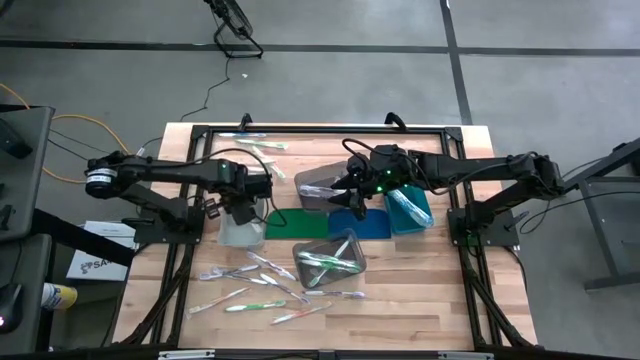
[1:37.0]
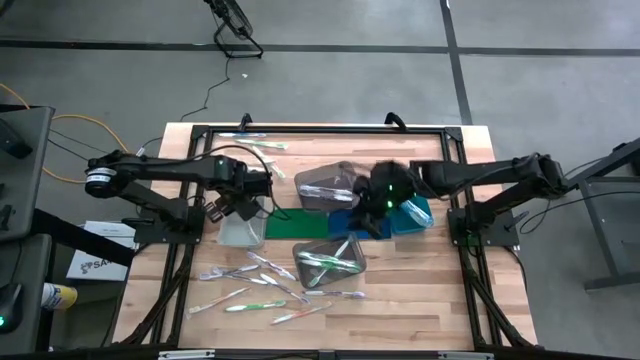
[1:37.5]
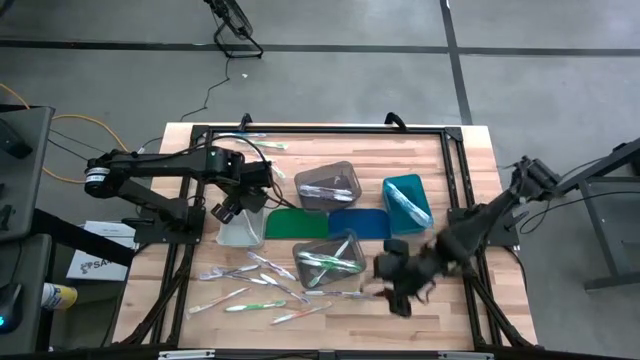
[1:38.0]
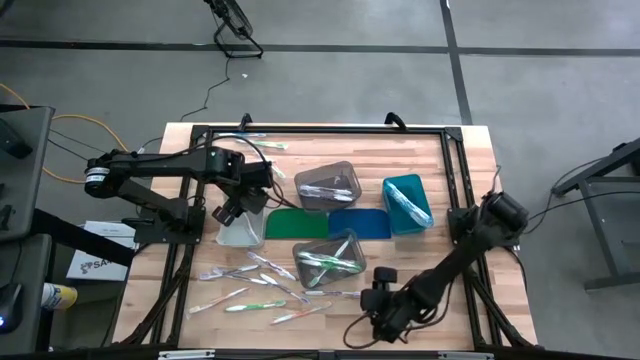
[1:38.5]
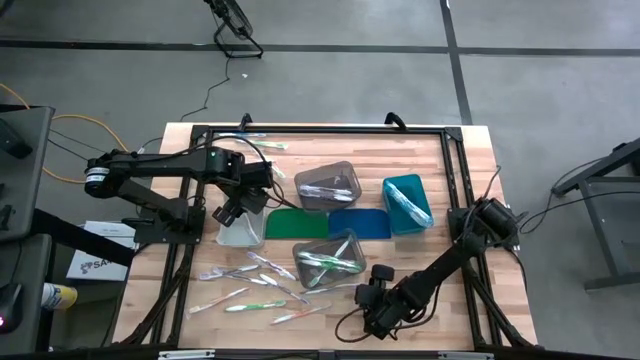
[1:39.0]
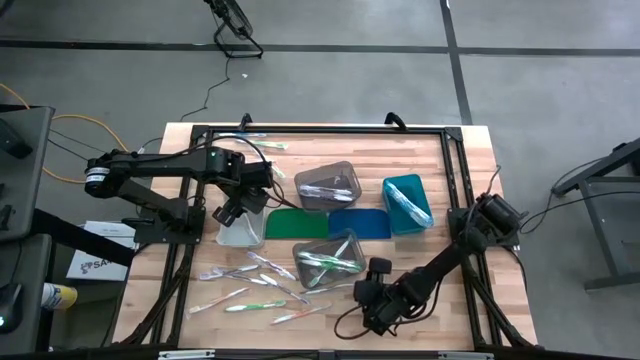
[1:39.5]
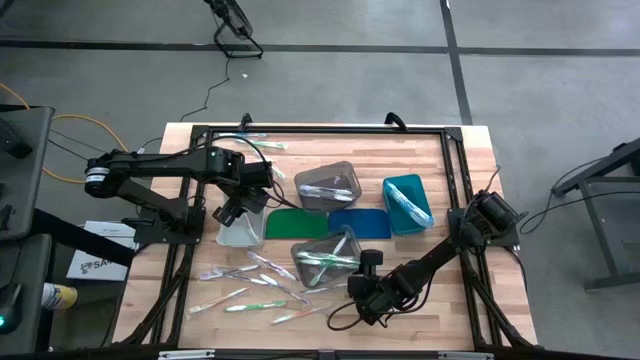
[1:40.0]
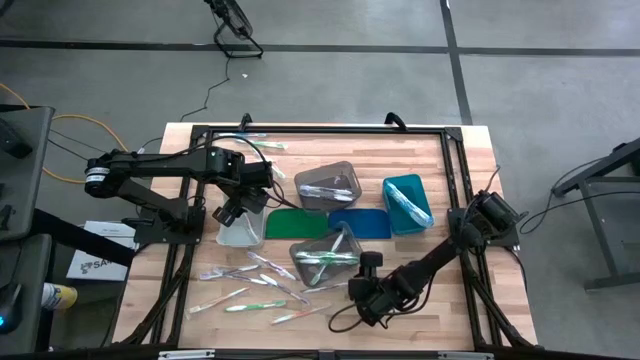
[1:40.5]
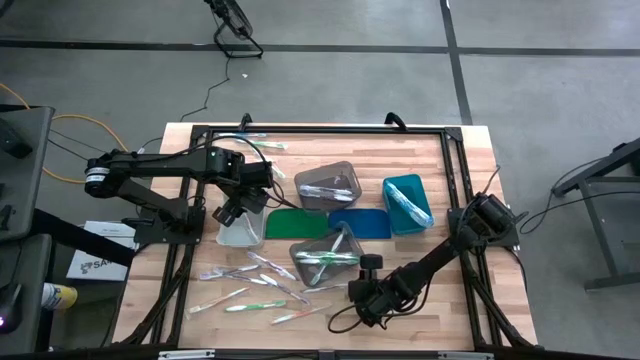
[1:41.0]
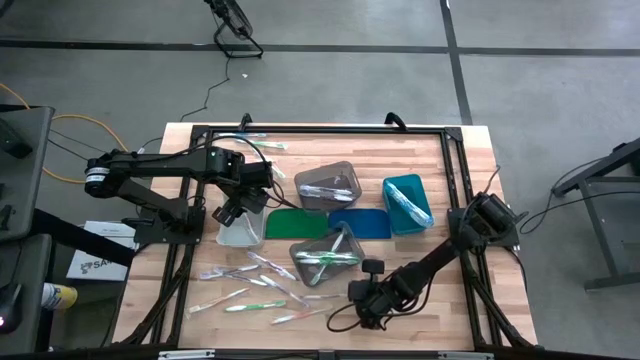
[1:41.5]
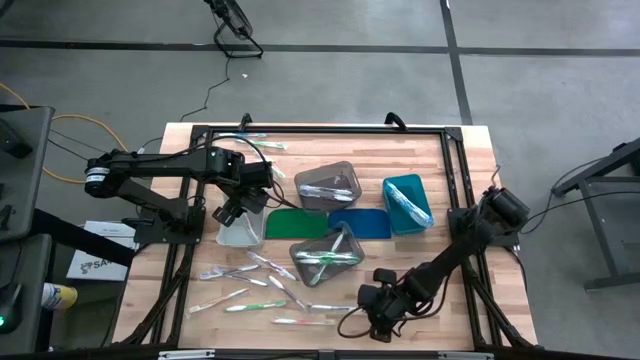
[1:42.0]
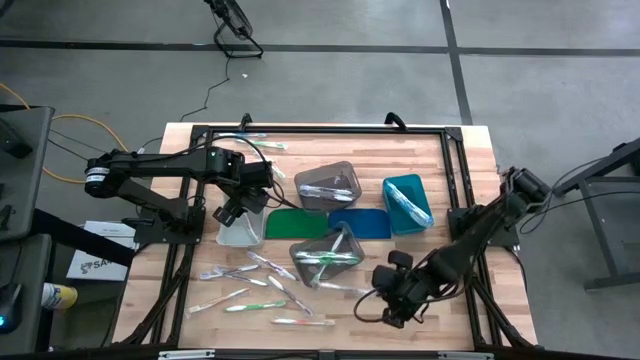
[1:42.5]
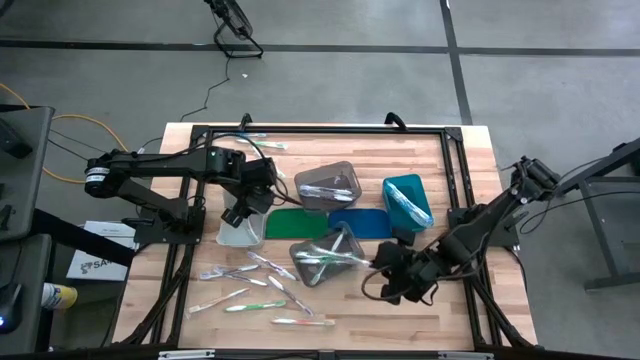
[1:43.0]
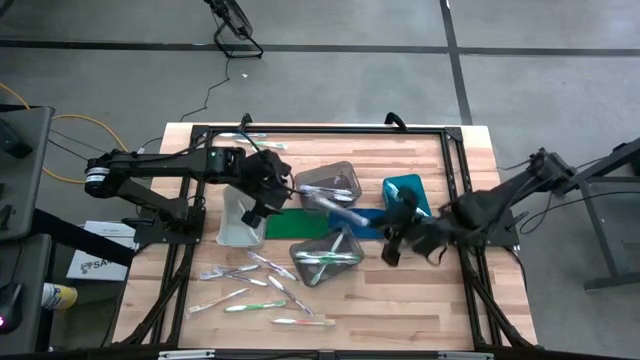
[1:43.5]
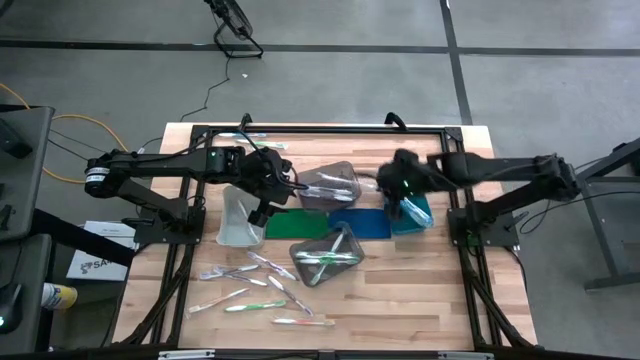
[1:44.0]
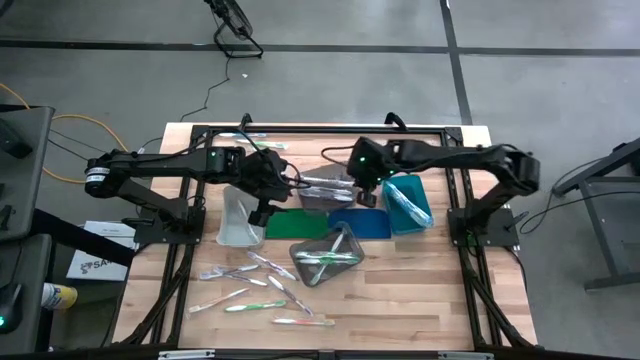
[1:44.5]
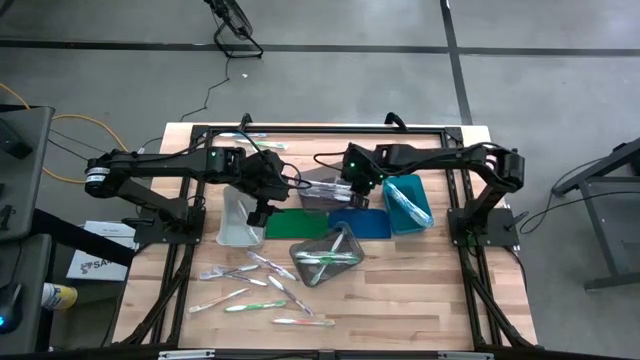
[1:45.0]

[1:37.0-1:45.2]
Task: Pick & Place Toothbrushes
Put the purple toothbrush into the top black bin

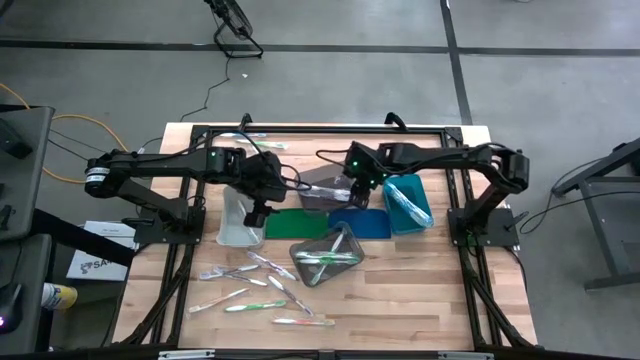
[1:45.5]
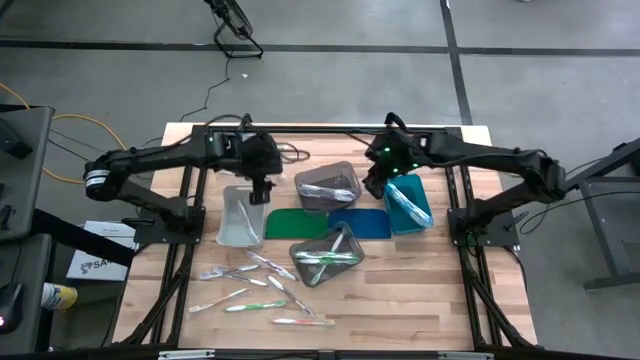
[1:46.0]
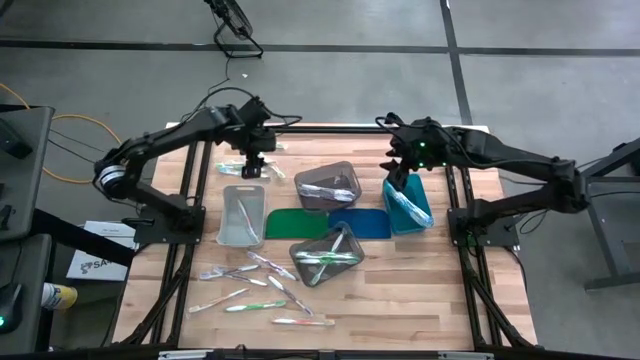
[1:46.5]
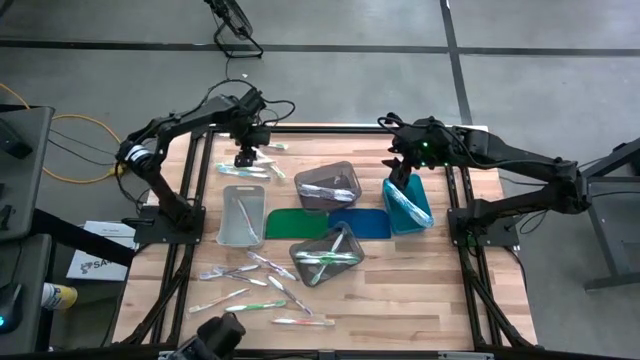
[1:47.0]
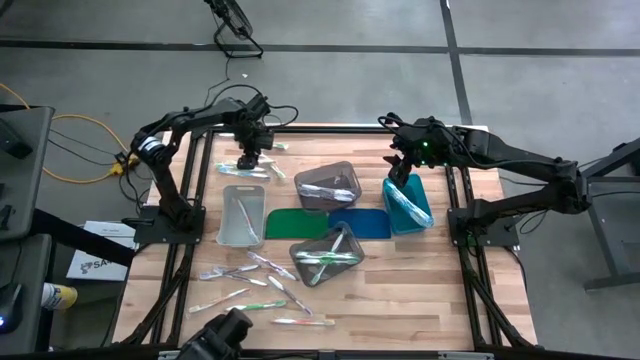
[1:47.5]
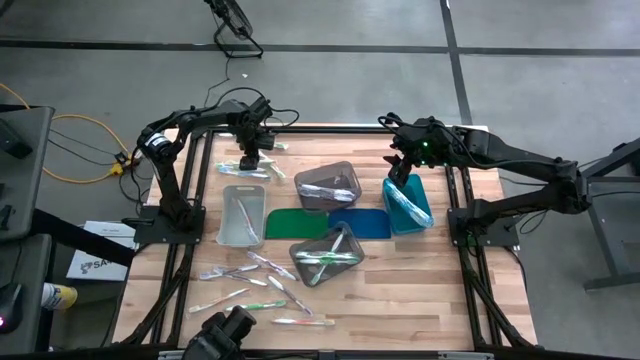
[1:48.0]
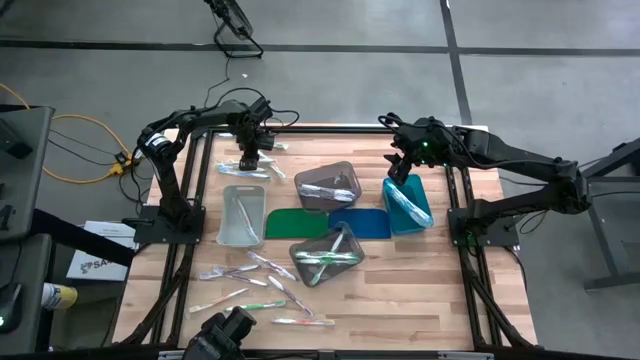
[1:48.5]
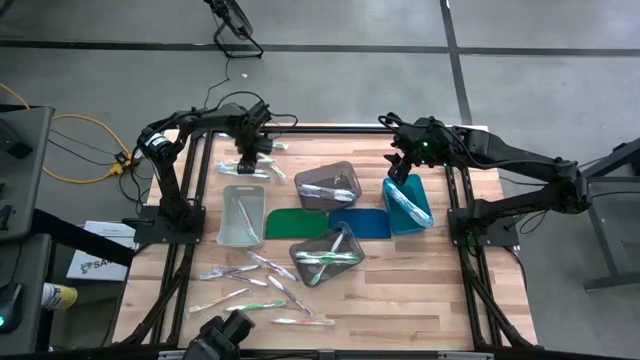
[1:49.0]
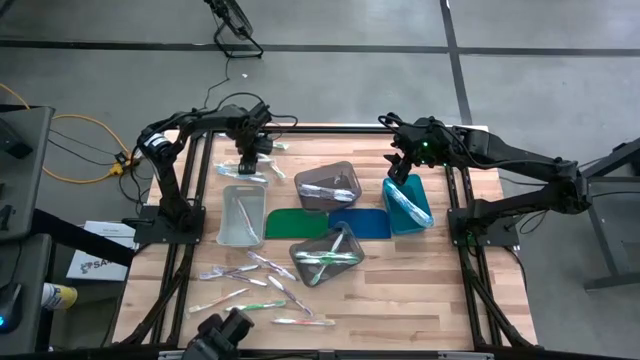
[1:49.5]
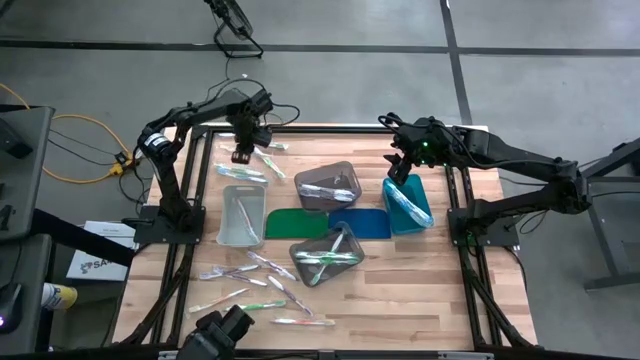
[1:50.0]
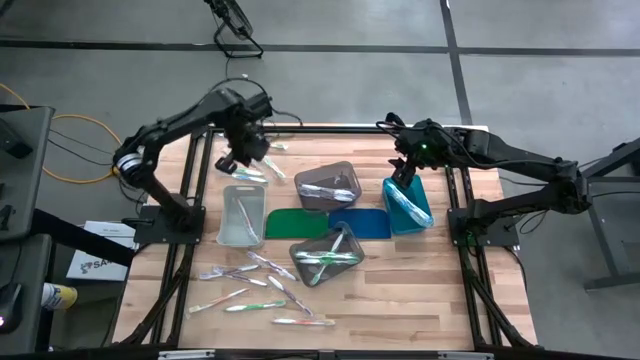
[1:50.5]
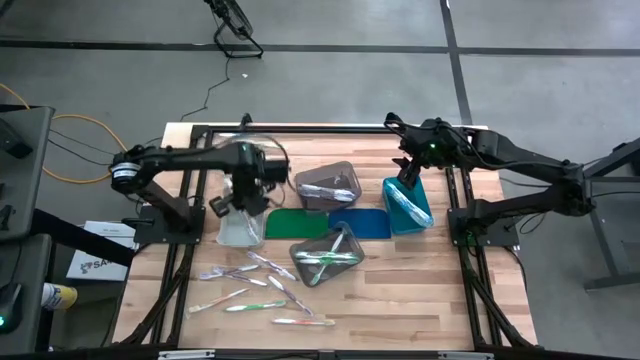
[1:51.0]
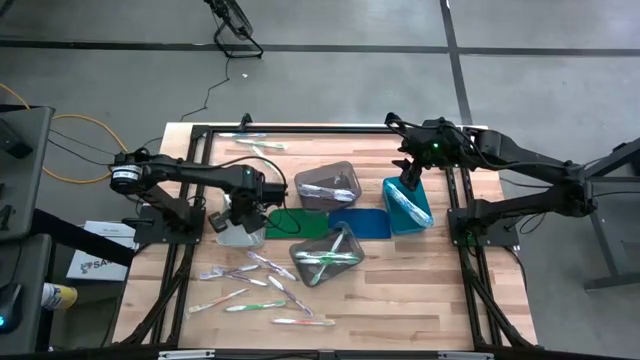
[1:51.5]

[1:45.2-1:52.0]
Put the orange toothbrush into the gray bin

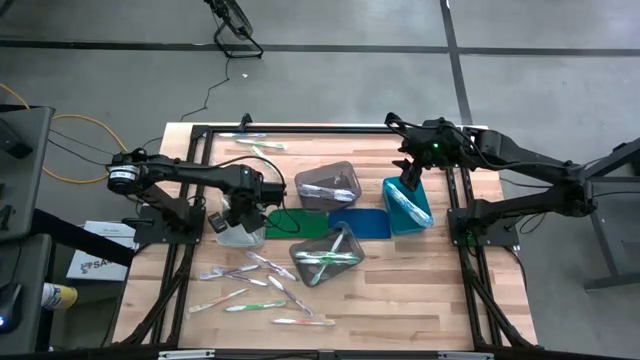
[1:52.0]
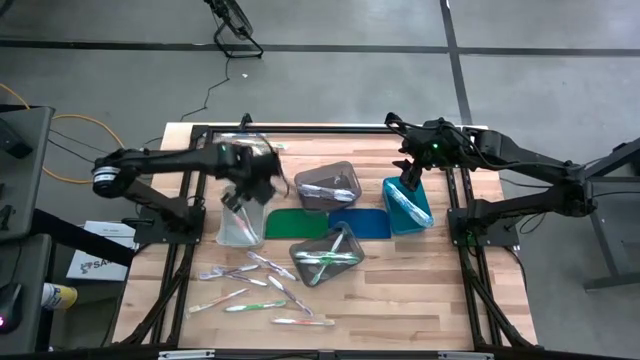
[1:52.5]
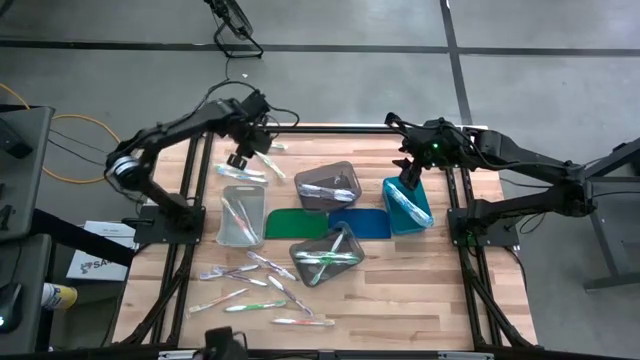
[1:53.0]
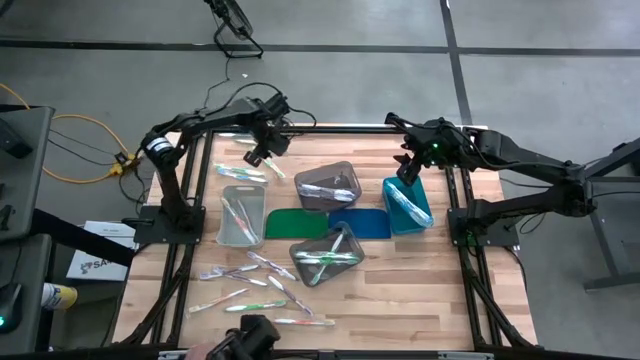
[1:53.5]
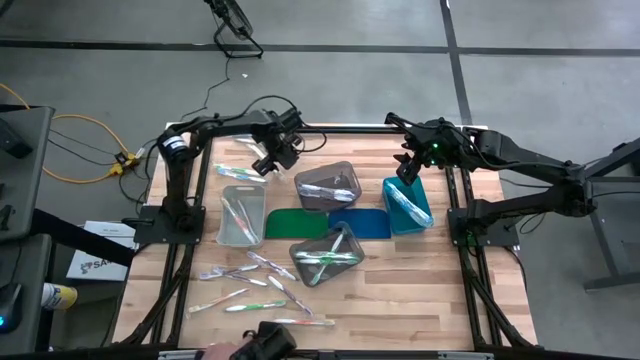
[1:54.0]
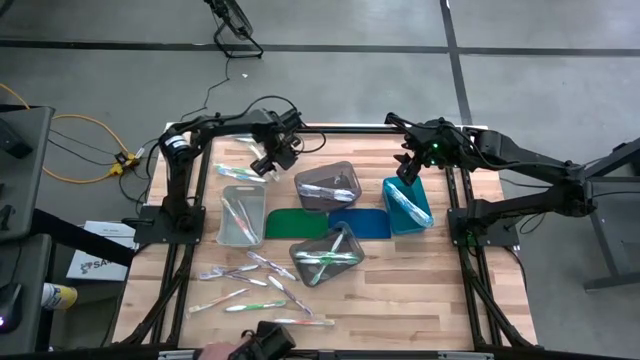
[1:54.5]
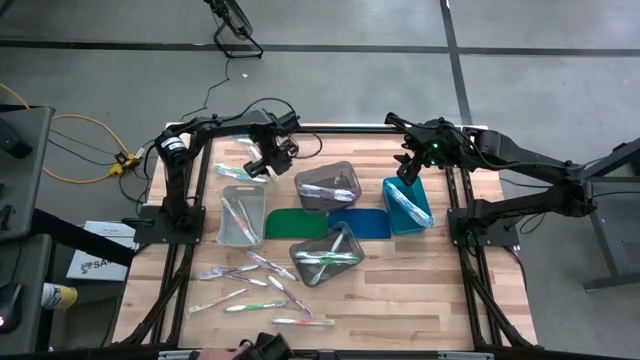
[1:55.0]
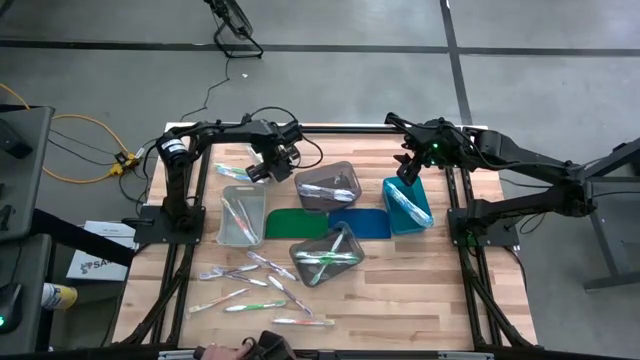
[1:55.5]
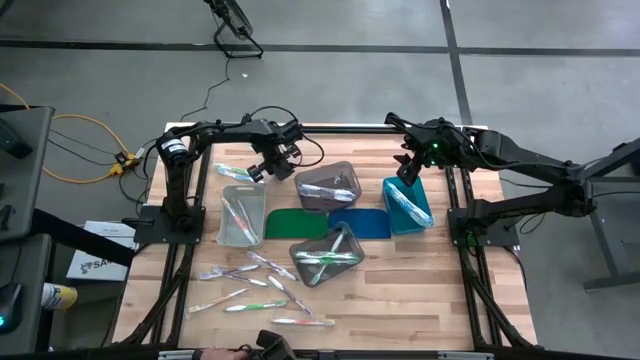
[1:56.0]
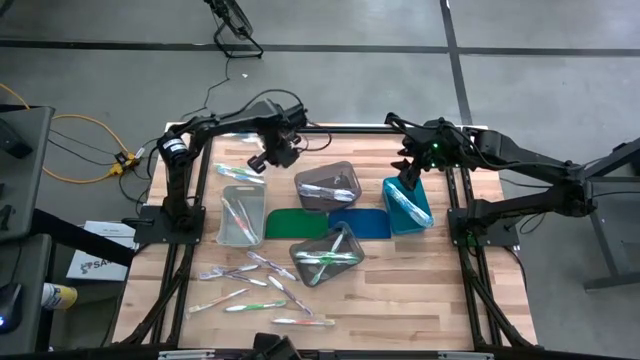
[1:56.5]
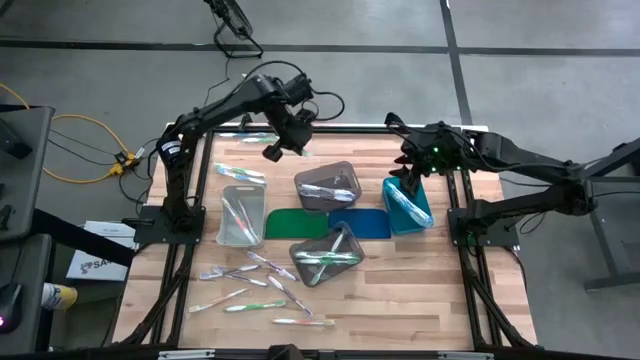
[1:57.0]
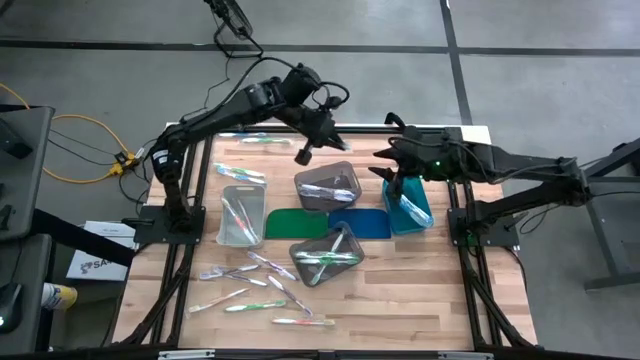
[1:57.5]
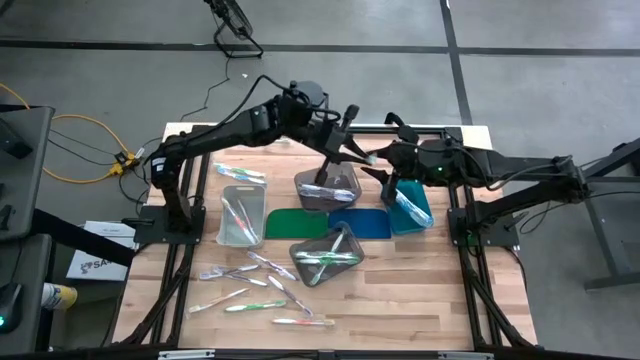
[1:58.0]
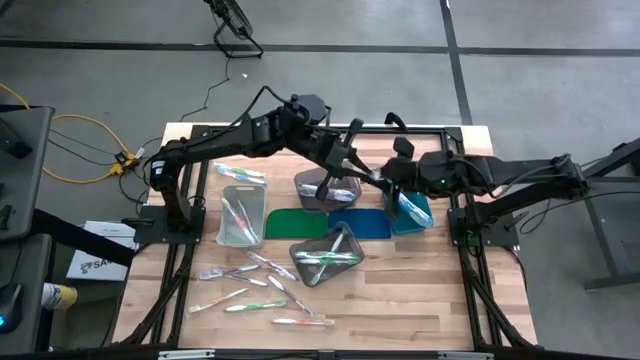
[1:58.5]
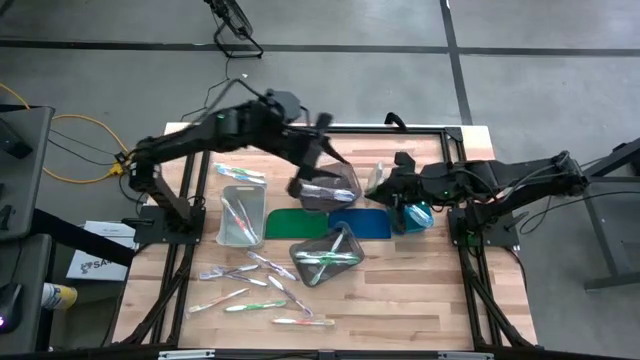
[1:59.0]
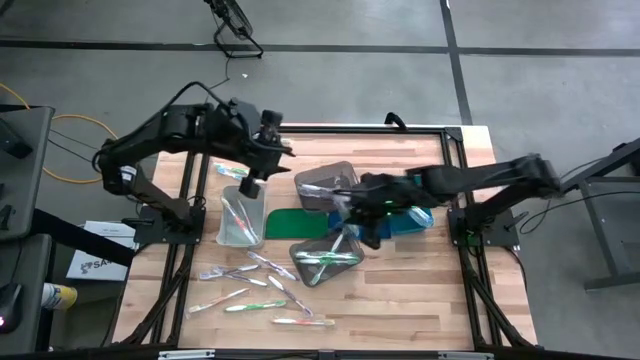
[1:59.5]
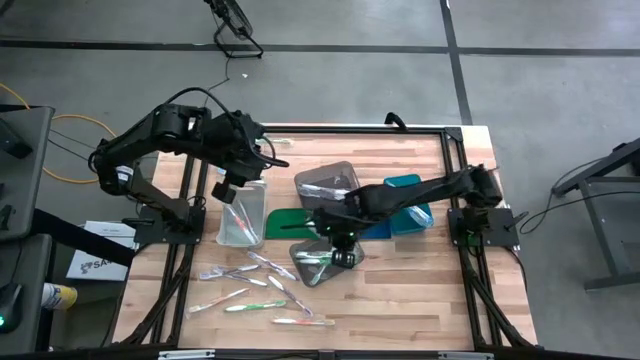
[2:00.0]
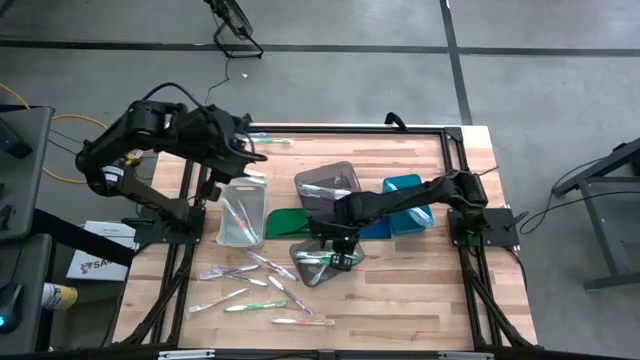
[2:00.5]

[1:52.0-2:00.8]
Put the green toothbrush into the bottom black bin
